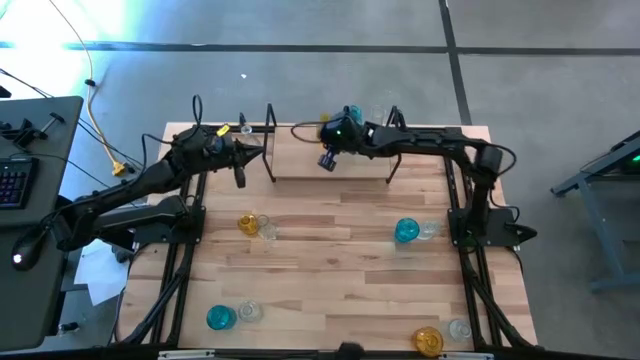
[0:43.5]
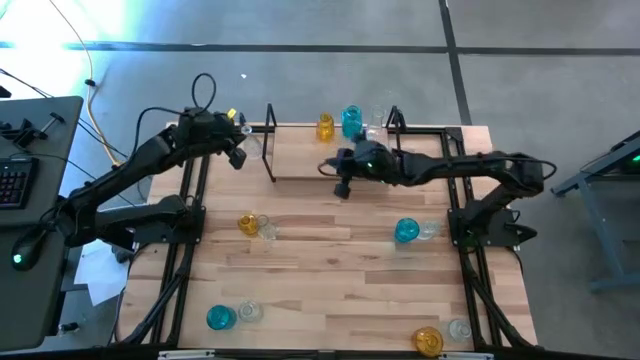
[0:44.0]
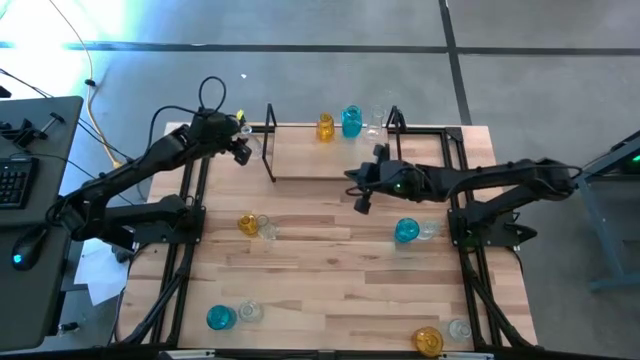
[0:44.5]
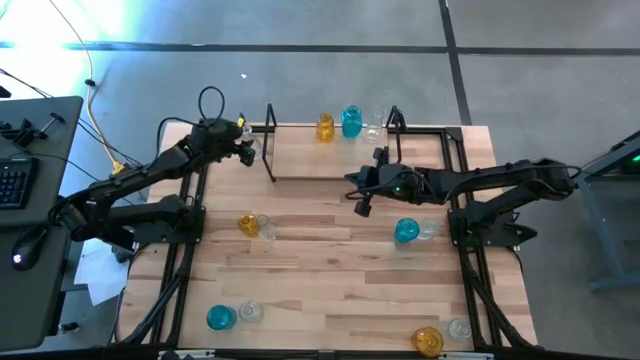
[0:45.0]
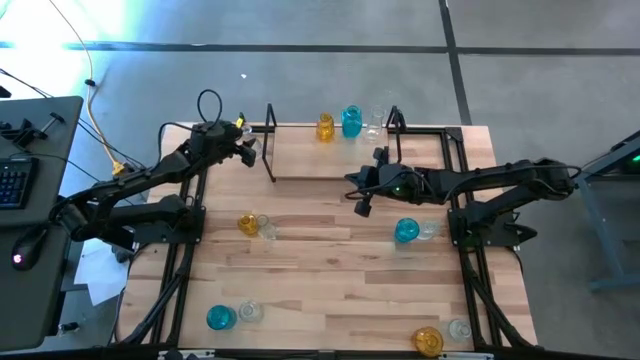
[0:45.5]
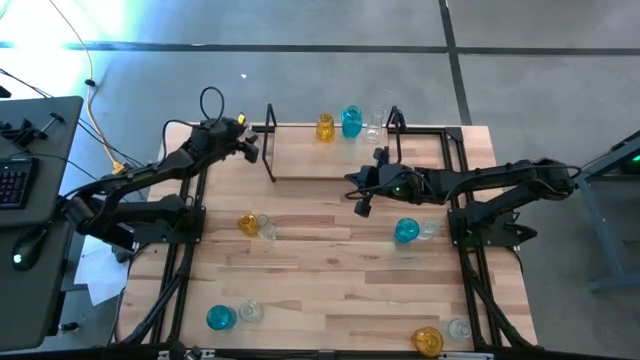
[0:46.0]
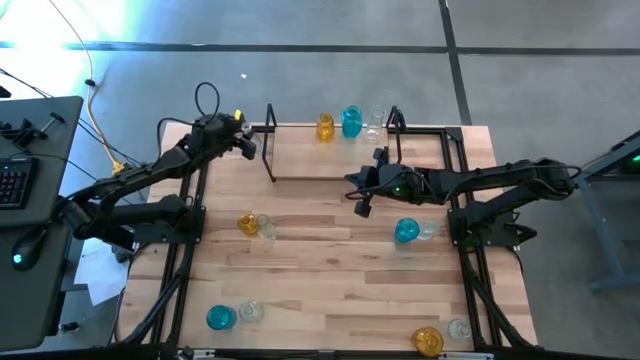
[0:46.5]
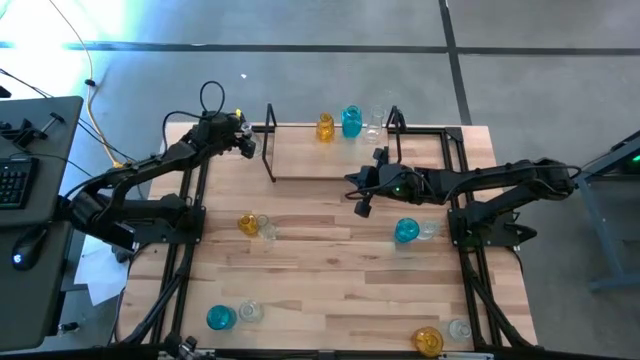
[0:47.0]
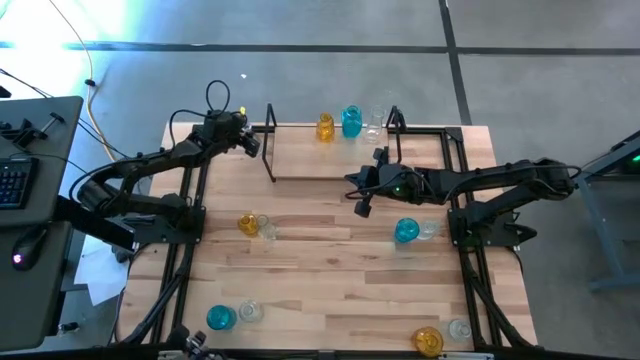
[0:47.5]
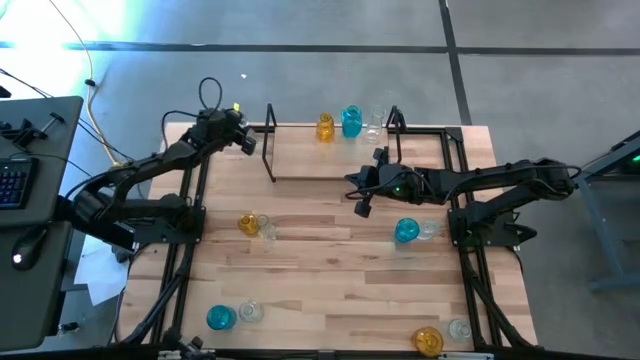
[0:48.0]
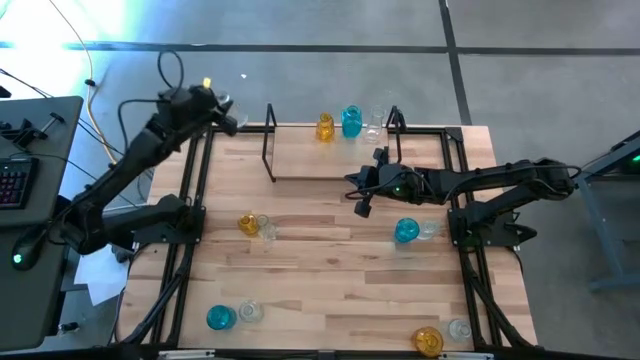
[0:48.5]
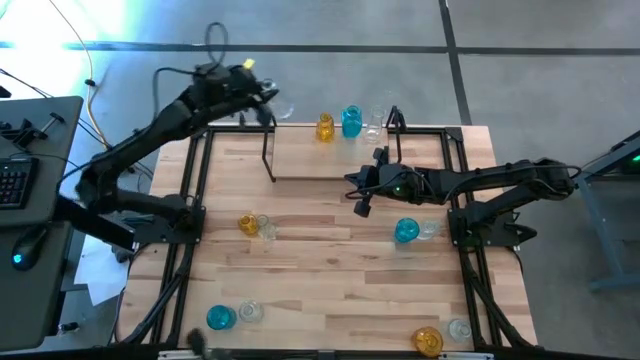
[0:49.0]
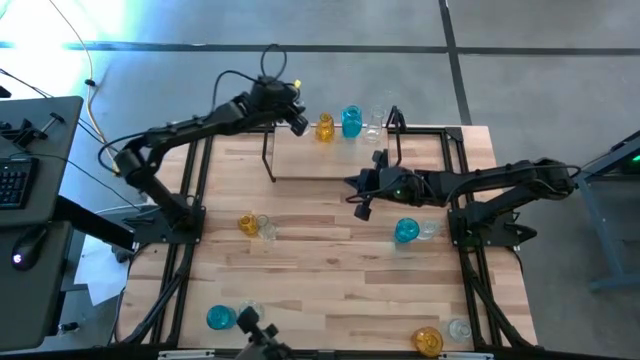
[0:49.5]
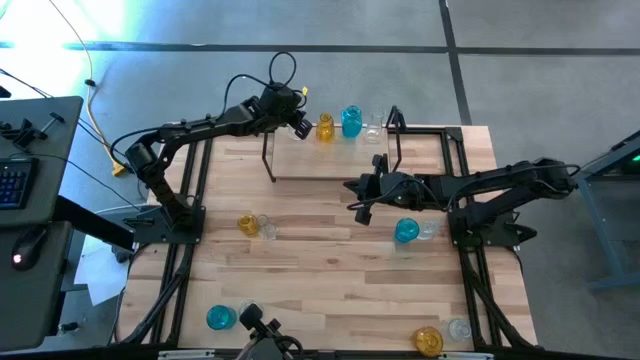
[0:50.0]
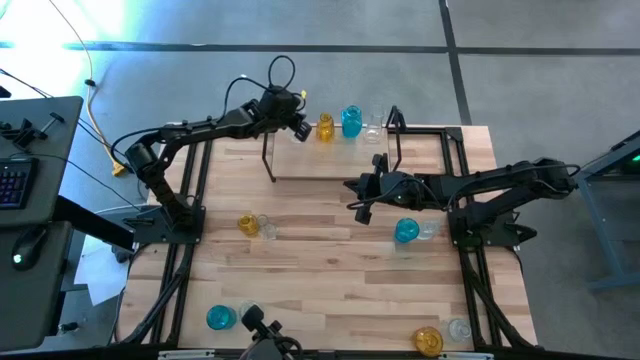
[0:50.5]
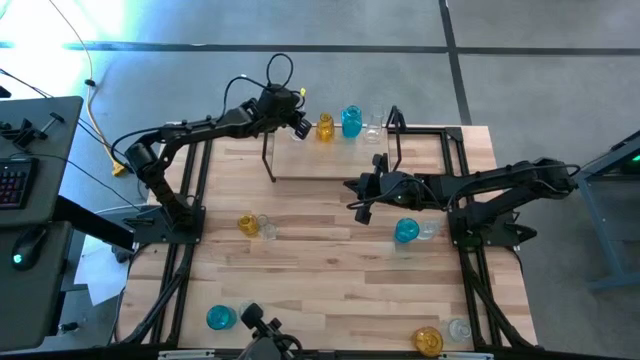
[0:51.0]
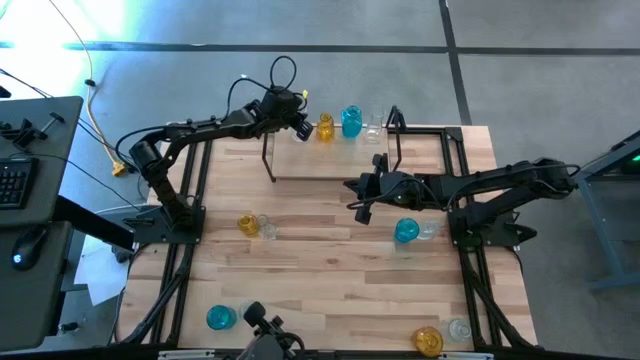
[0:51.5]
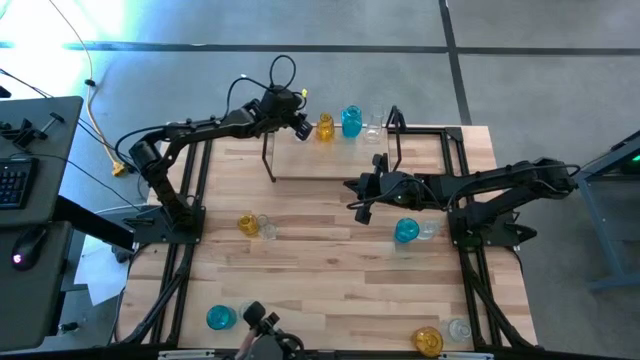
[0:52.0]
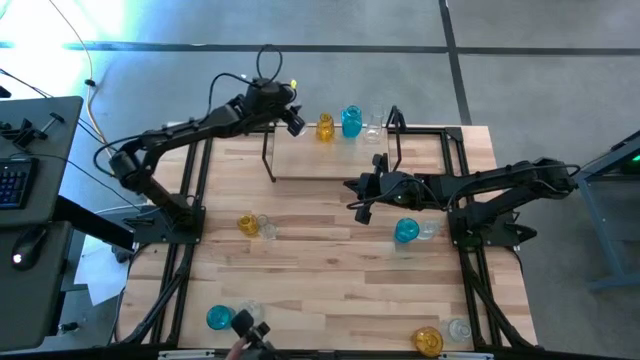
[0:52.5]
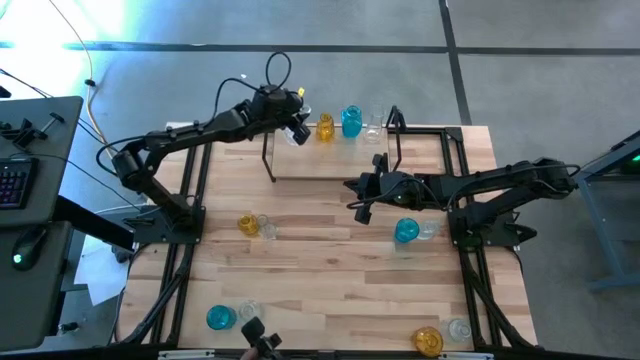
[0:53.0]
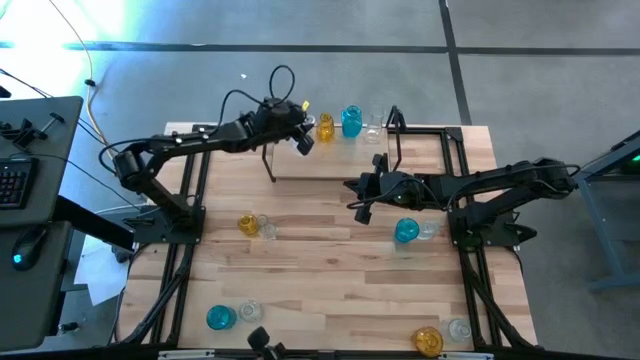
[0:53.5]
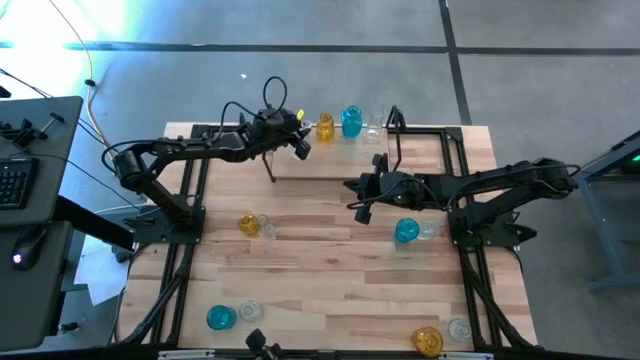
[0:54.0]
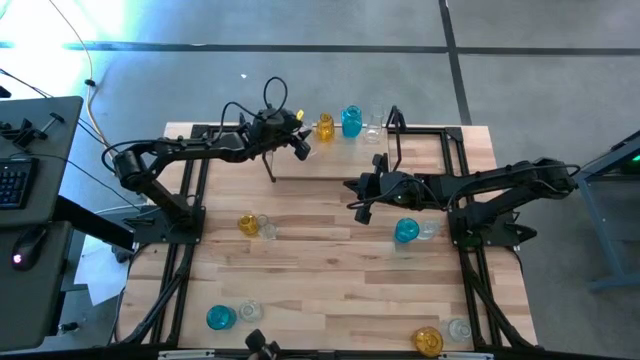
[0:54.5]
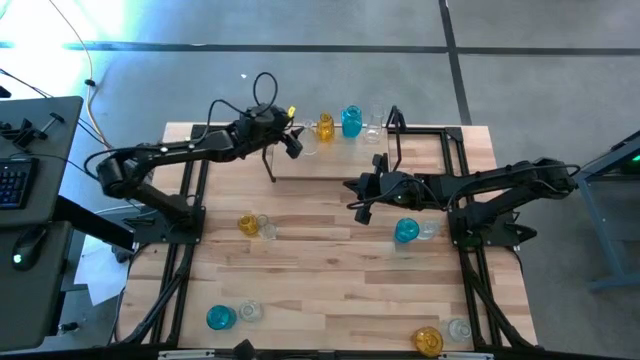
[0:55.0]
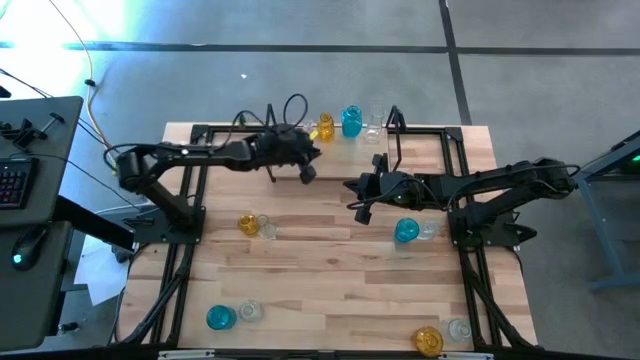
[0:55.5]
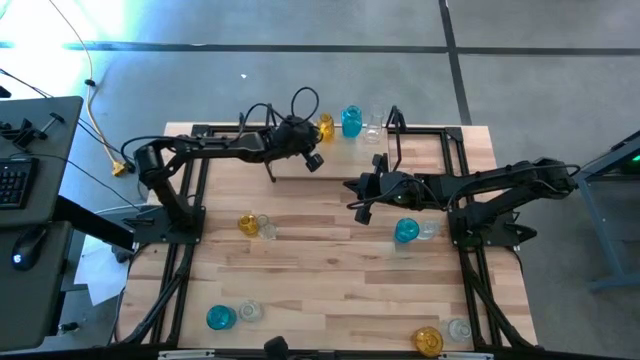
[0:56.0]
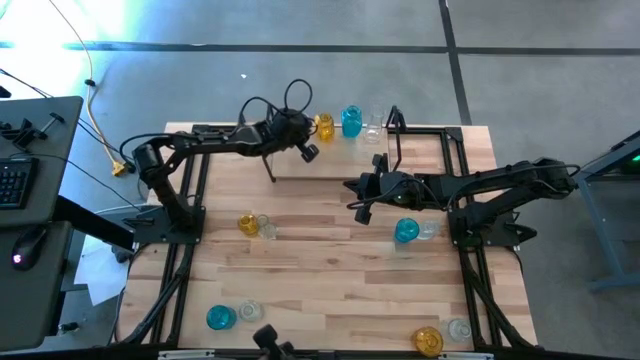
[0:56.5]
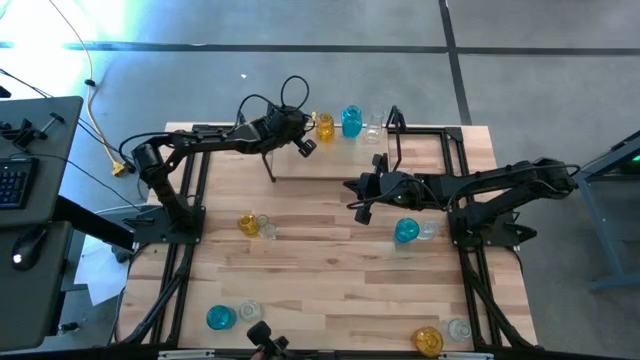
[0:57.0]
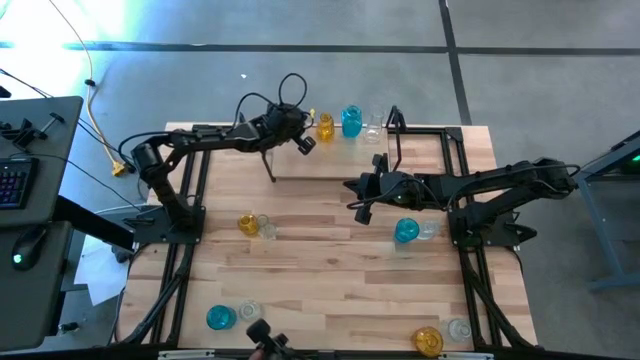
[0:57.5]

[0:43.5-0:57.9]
Task: sort vases onto shelf
Put the transparent vase on the shelf

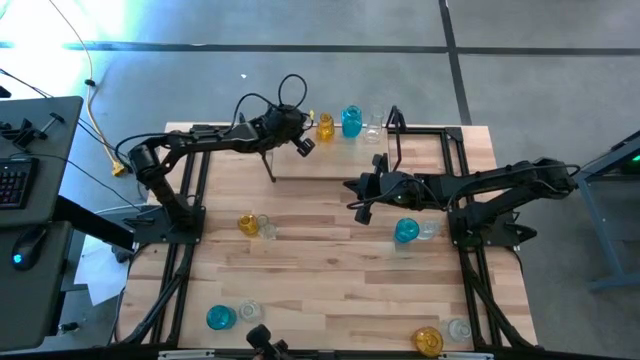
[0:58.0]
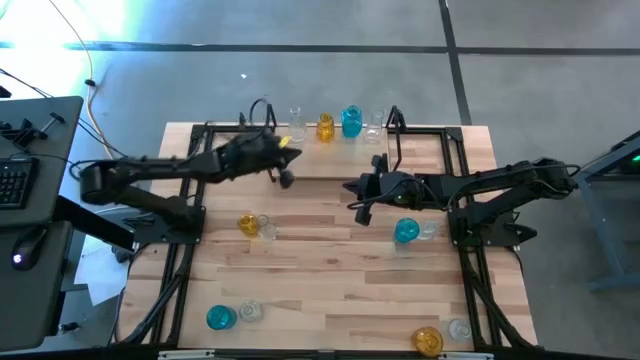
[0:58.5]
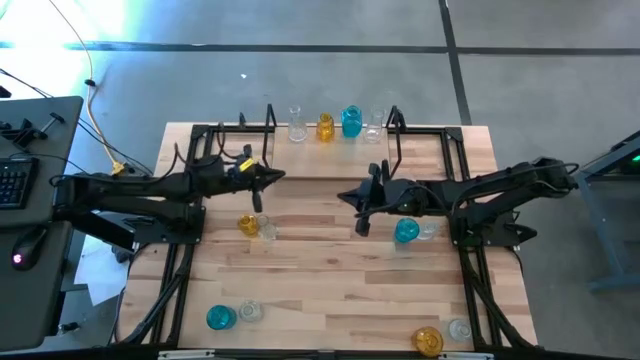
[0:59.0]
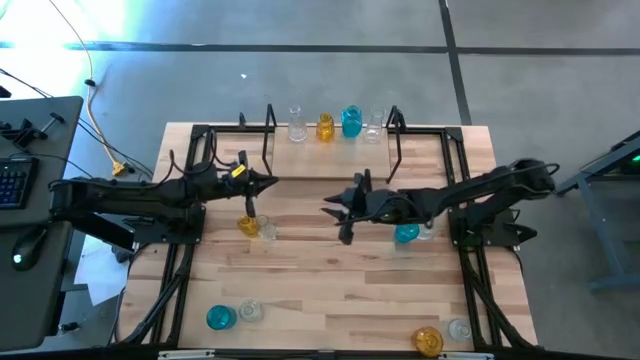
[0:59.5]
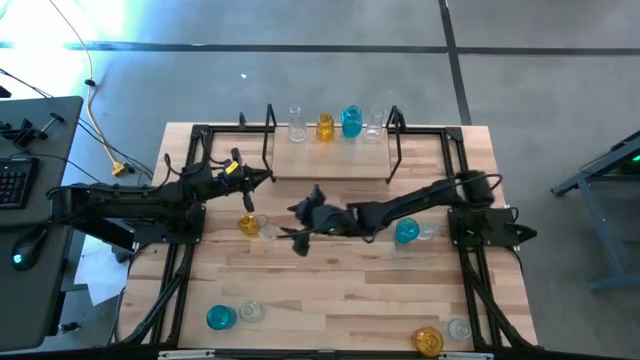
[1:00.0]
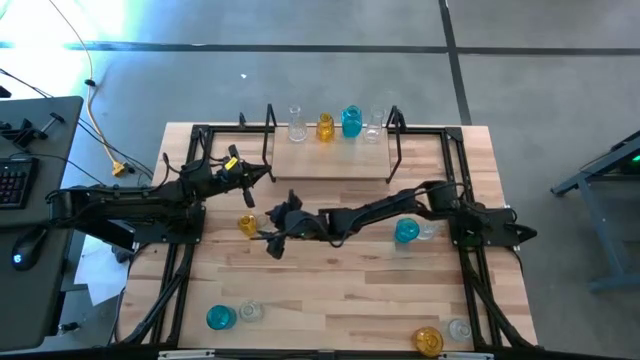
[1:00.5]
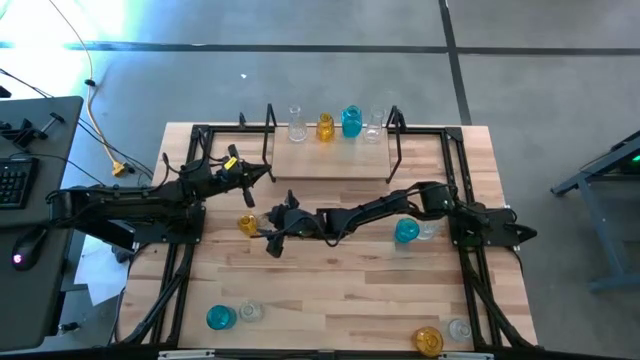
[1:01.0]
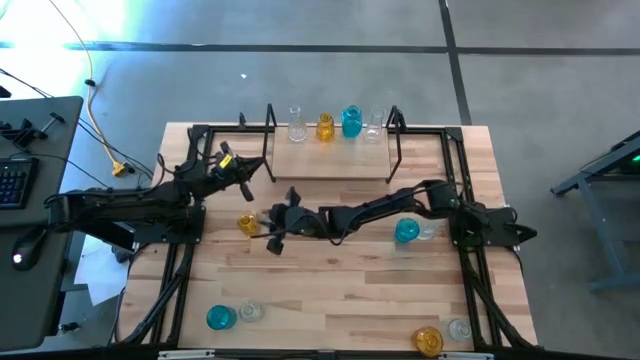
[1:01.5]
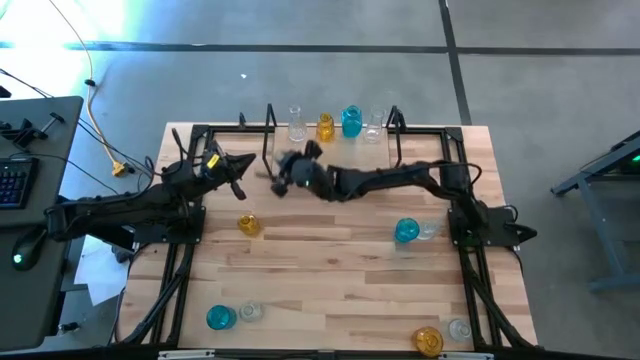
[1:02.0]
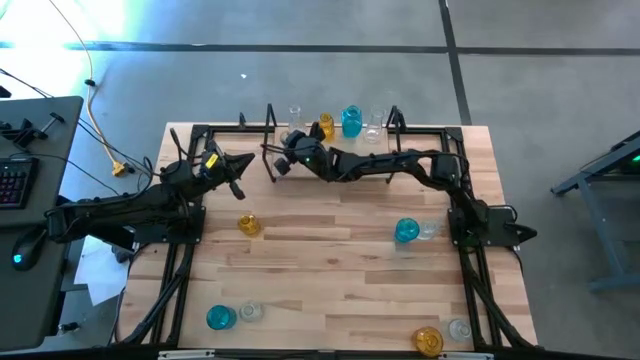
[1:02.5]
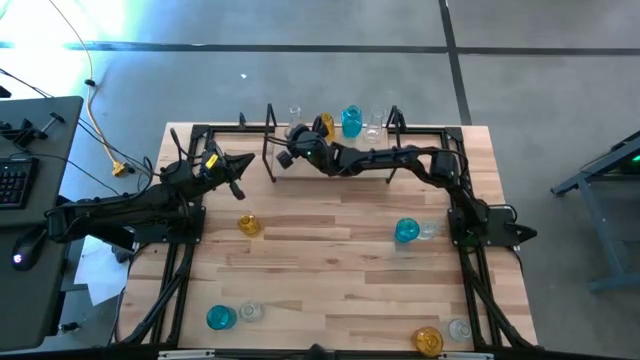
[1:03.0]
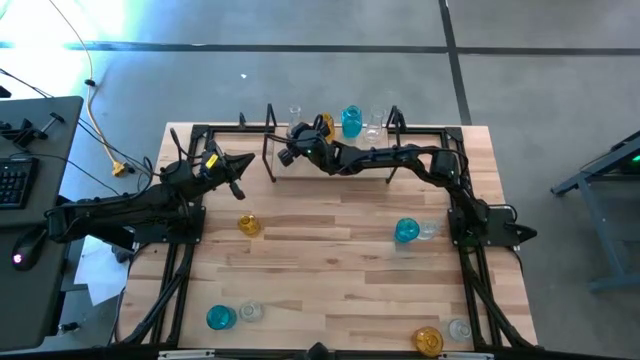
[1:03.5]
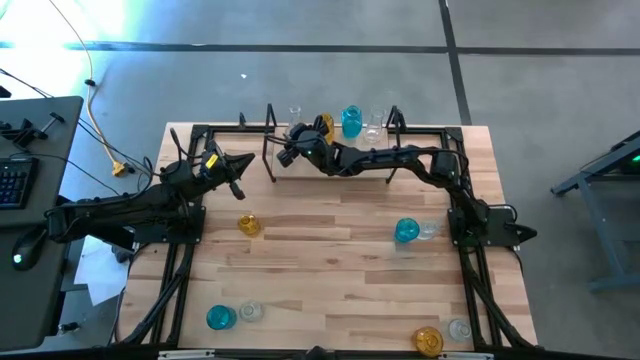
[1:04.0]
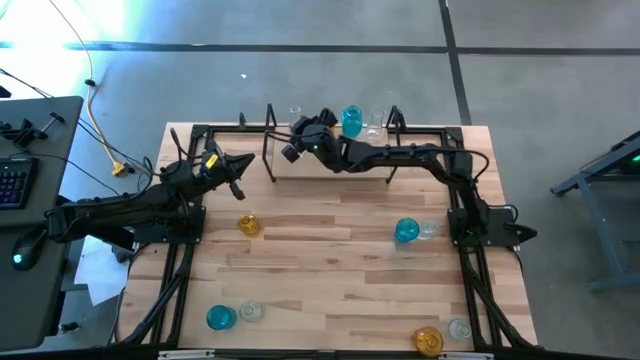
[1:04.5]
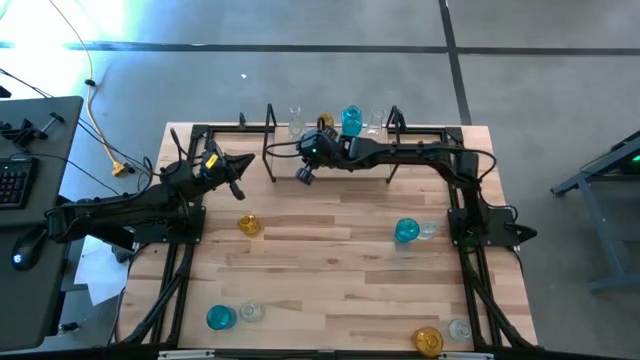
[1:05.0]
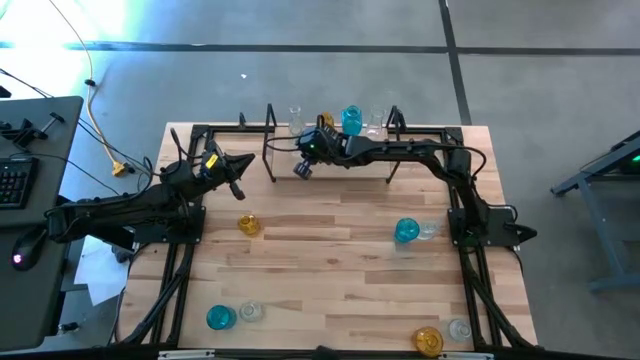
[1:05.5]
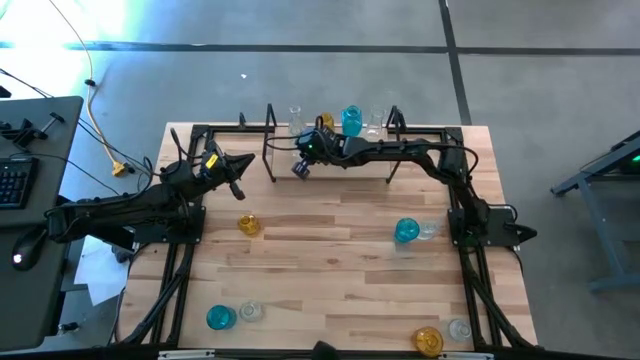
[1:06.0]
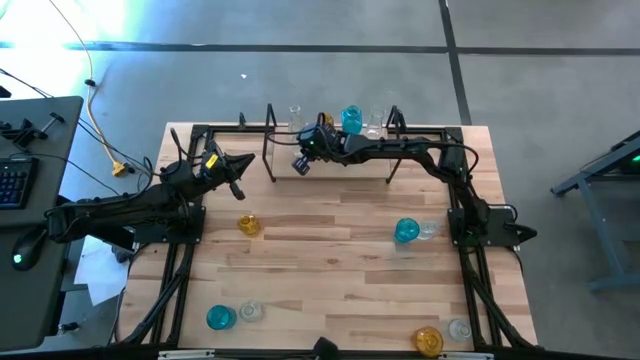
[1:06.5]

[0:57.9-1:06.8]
Put the transparent vase on the shelf aligned with the other transparent vase
